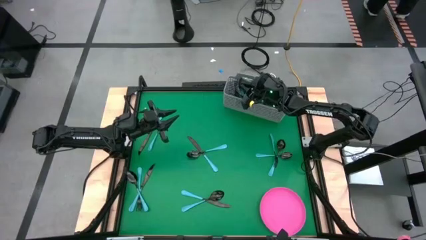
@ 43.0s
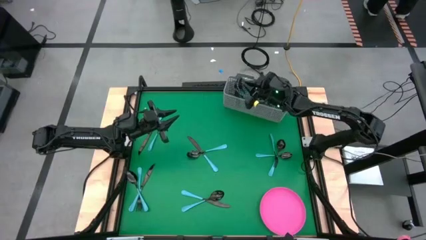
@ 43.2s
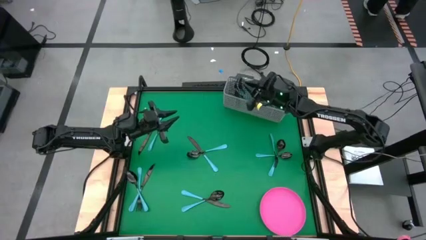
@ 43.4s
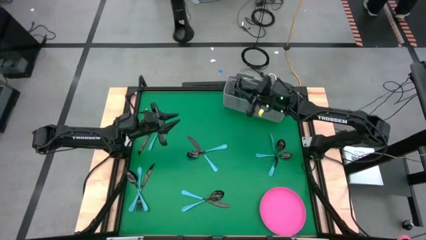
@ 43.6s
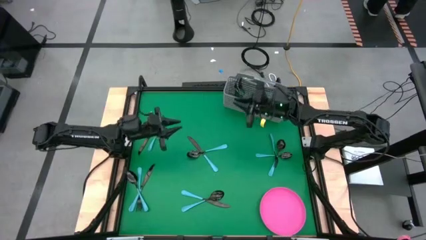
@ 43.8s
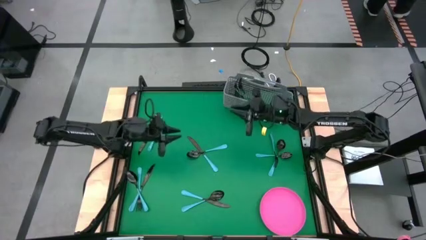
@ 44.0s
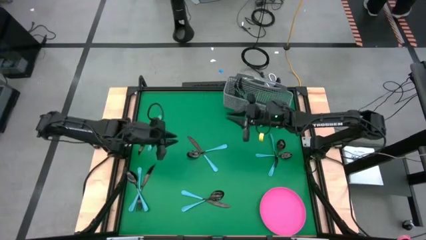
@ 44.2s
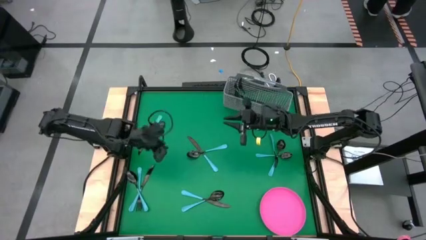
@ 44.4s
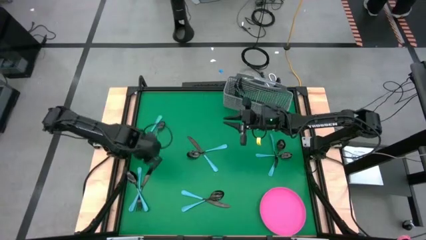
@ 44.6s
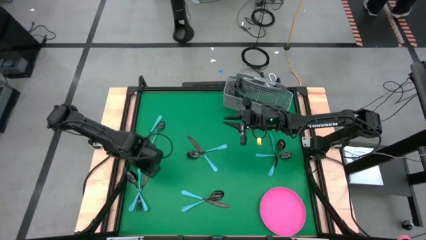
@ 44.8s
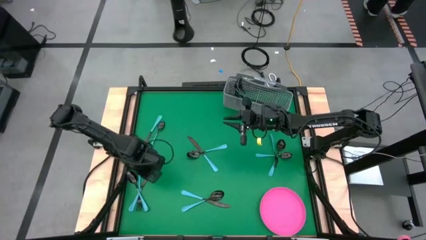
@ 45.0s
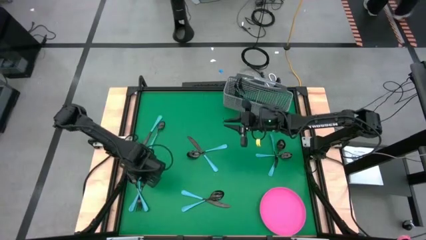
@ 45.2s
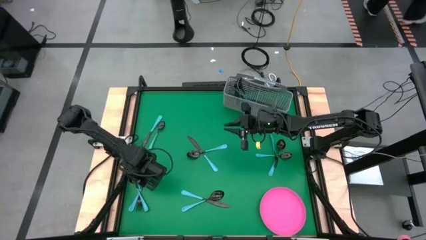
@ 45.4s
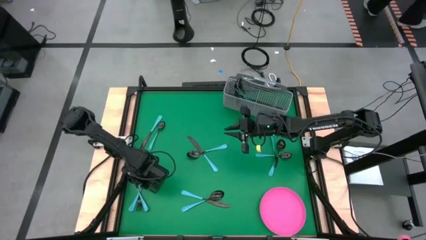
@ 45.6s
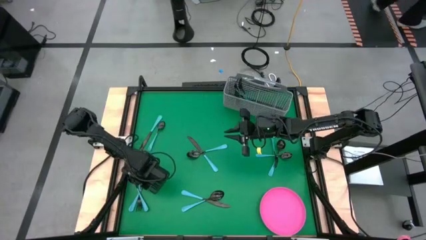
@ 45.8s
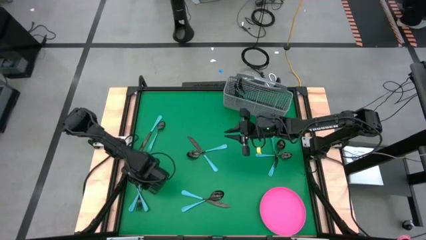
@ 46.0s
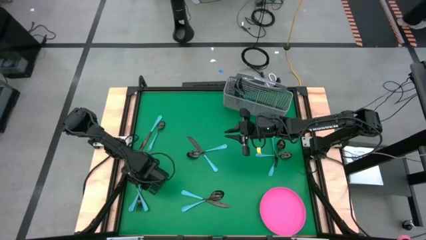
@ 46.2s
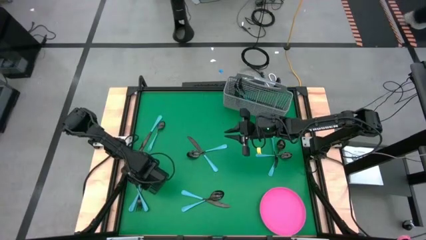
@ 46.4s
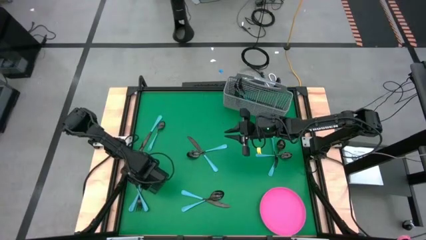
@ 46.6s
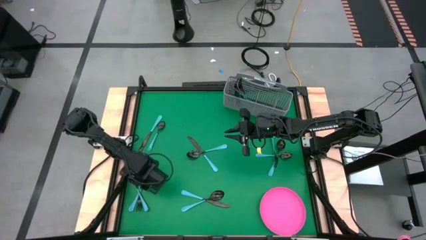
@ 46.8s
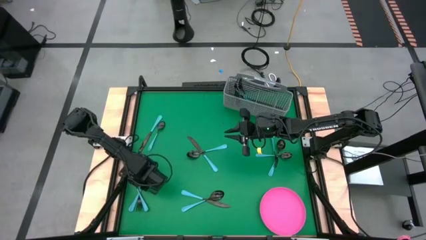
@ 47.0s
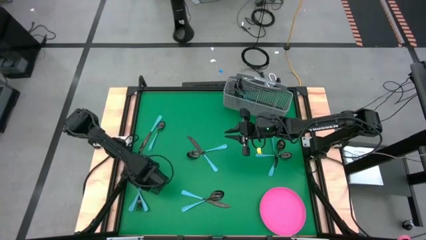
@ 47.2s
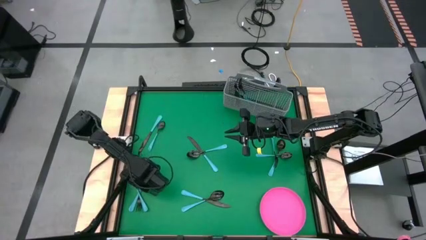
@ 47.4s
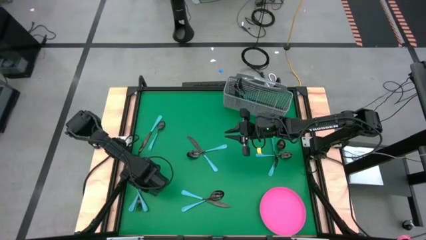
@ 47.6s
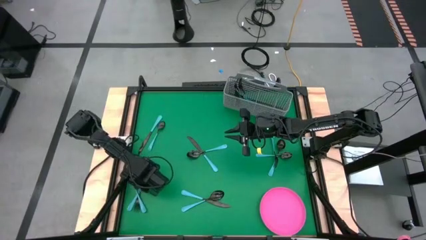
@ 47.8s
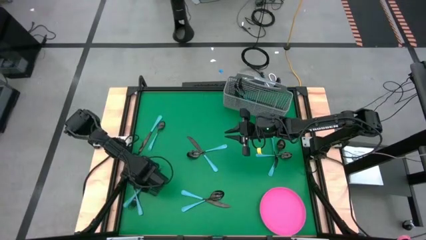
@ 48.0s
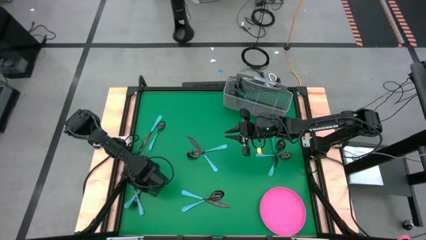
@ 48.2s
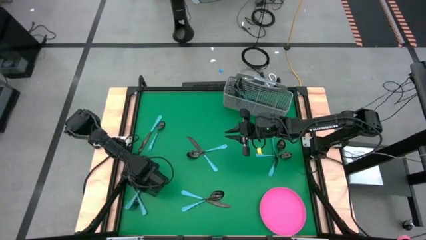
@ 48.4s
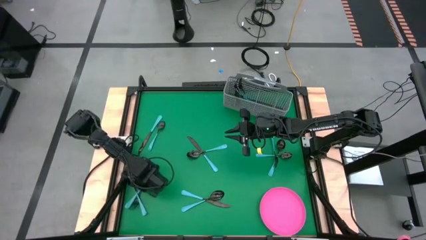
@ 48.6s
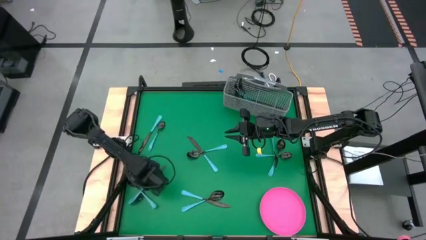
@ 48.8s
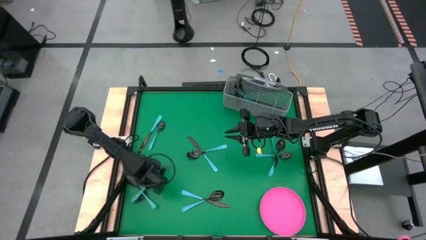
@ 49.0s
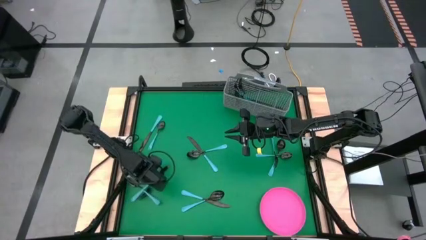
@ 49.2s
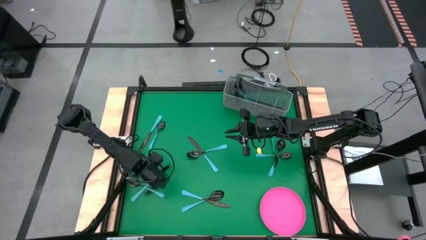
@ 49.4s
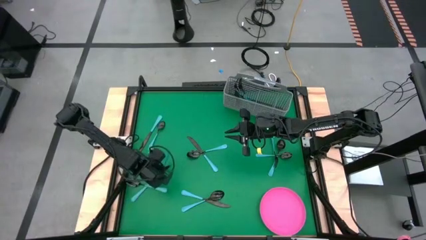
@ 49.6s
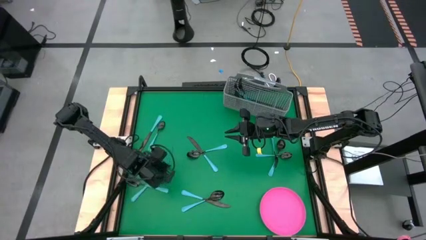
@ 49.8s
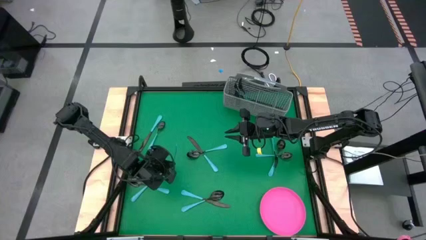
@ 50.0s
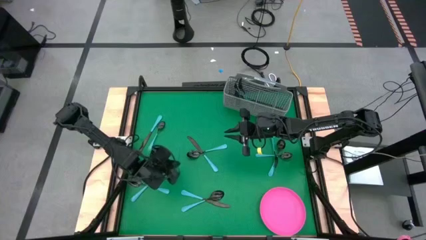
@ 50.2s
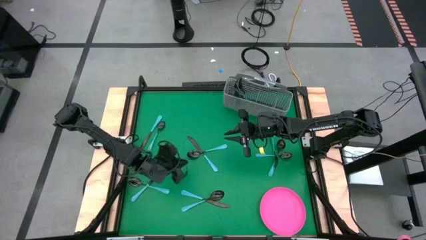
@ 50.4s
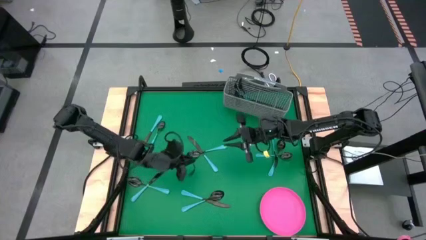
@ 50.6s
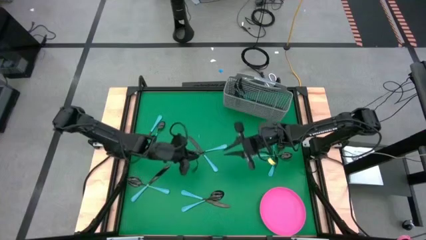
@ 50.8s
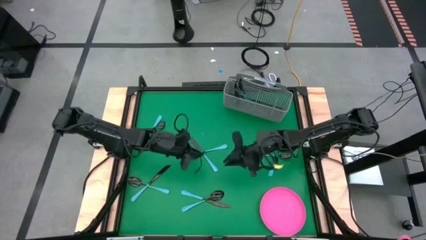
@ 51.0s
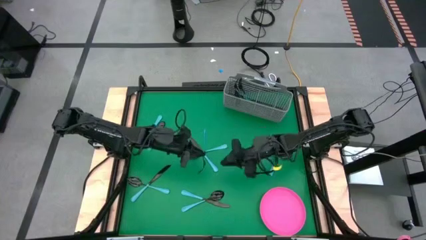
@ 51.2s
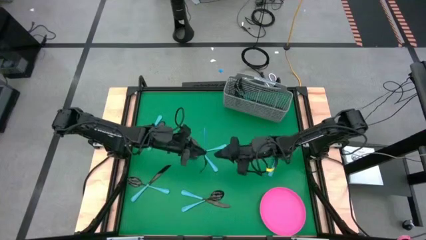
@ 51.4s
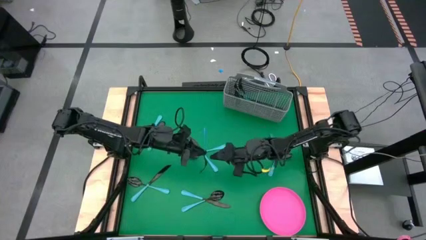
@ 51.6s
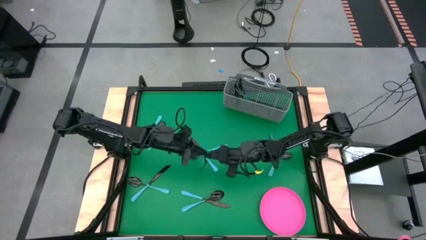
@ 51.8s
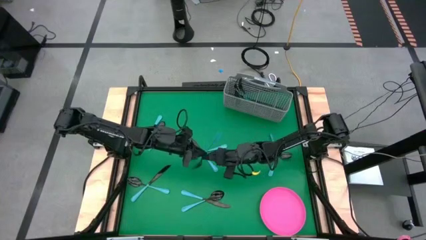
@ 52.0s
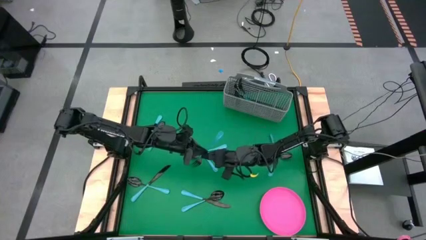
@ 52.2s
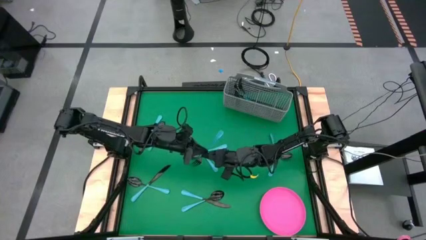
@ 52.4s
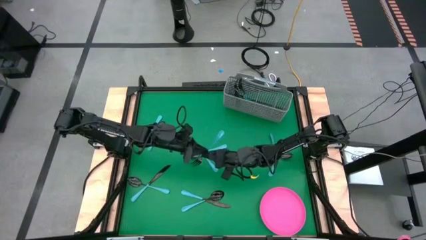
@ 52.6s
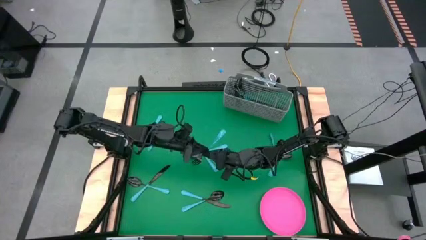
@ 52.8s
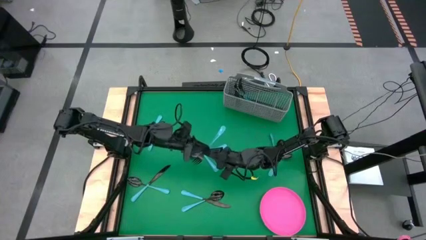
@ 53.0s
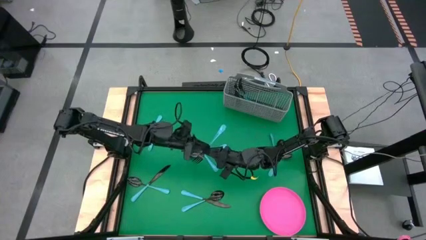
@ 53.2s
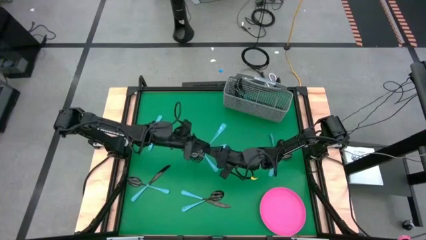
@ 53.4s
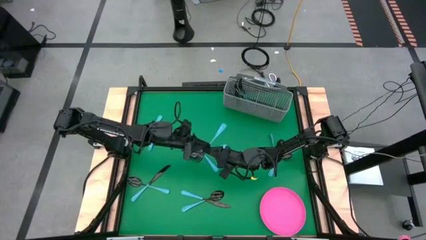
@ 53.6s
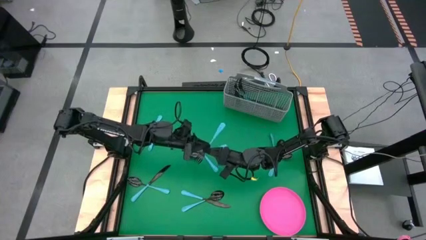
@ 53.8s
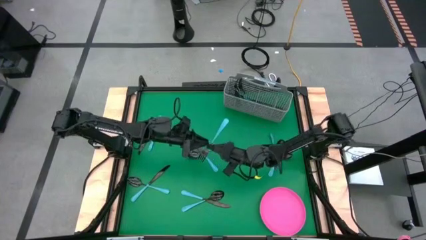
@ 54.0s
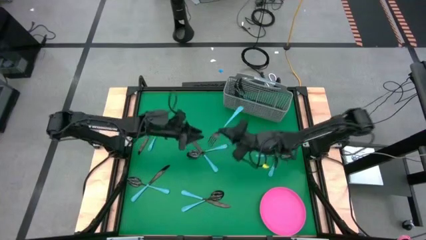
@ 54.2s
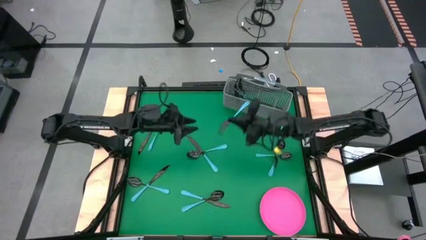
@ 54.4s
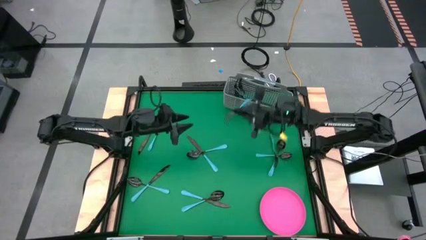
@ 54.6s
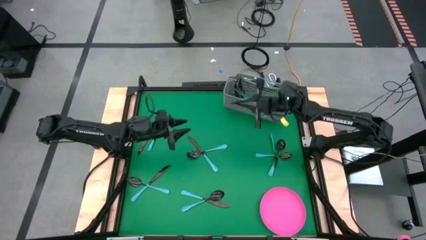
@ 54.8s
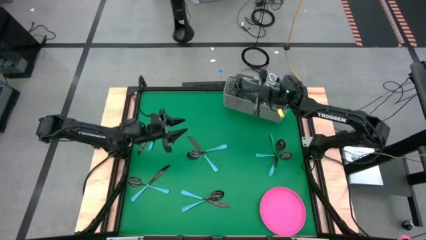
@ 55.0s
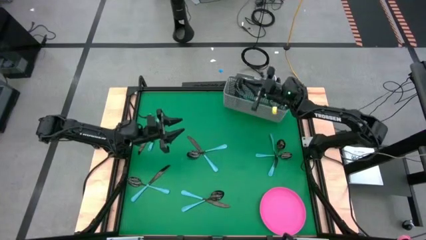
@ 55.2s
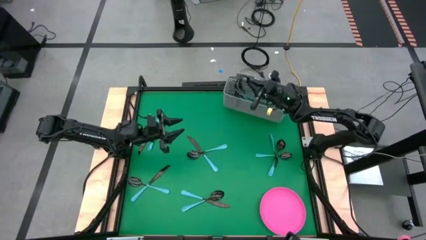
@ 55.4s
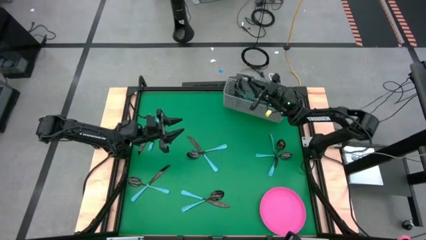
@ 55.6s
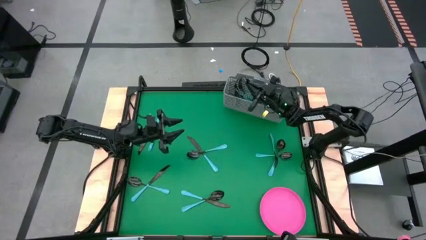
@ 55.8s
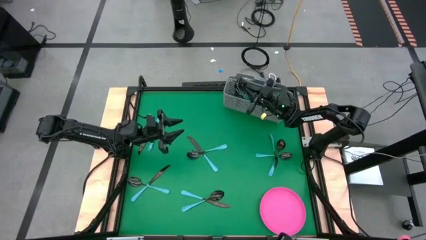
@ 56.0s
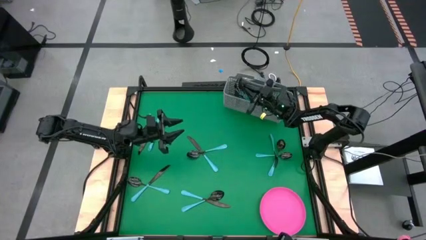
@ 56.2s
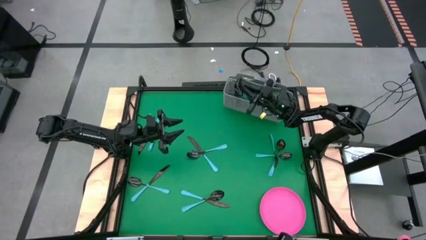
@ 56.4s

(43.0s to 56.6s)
Task: Sort silverware
Put the blue fork into the silverware basket

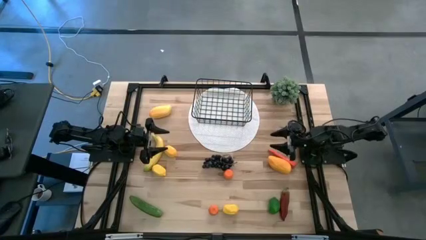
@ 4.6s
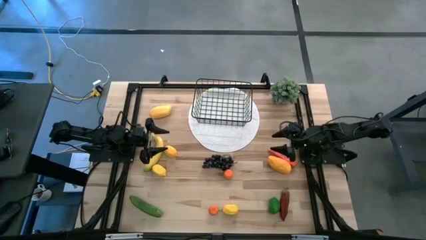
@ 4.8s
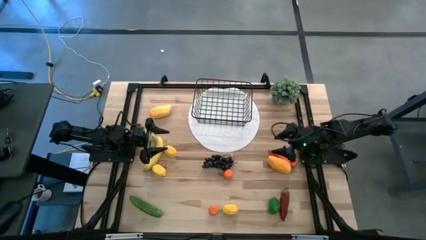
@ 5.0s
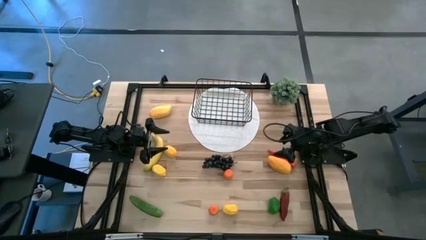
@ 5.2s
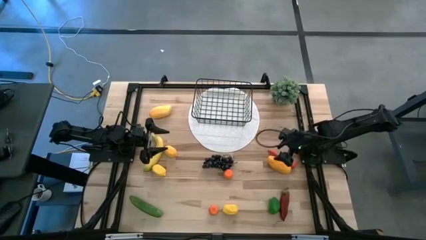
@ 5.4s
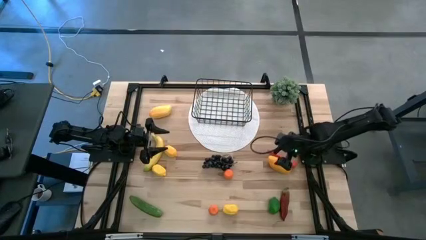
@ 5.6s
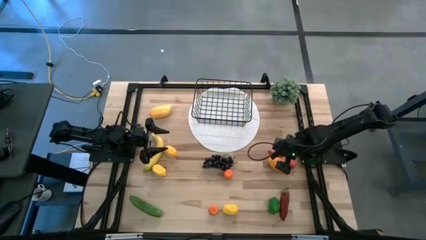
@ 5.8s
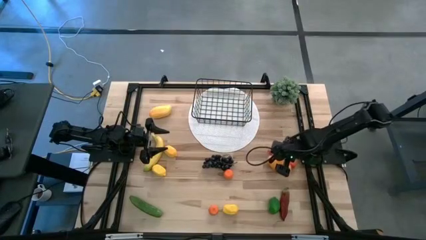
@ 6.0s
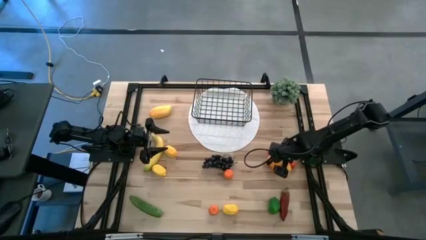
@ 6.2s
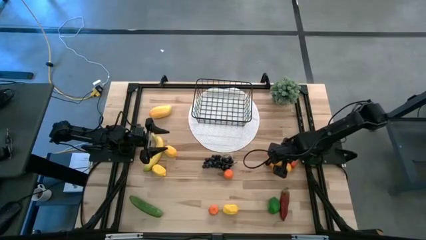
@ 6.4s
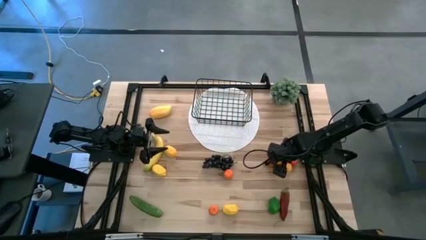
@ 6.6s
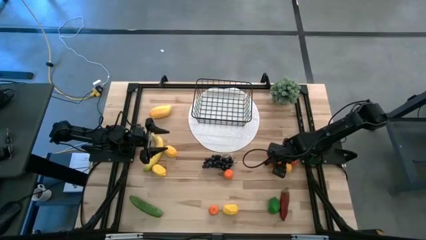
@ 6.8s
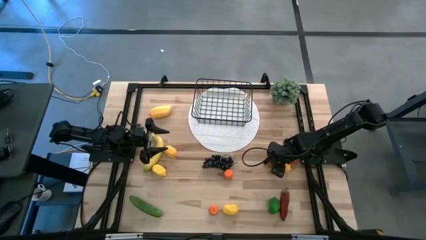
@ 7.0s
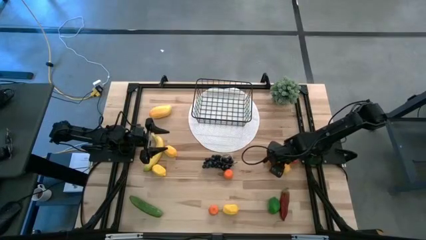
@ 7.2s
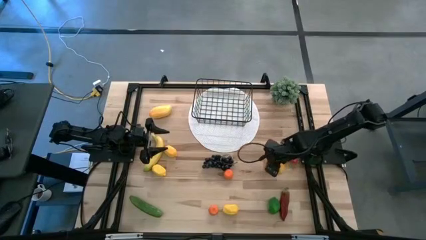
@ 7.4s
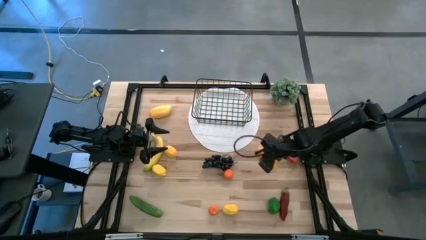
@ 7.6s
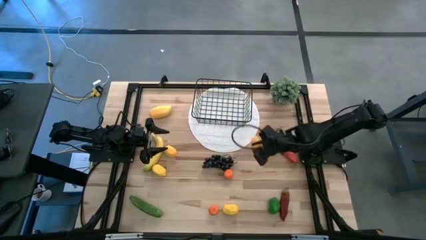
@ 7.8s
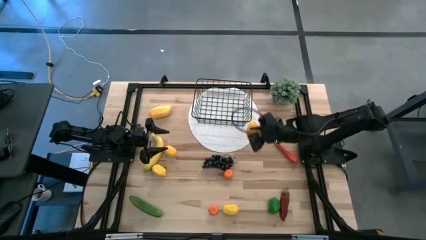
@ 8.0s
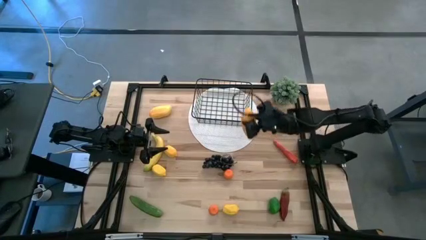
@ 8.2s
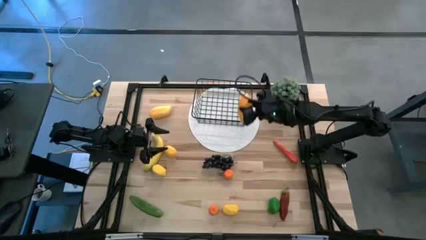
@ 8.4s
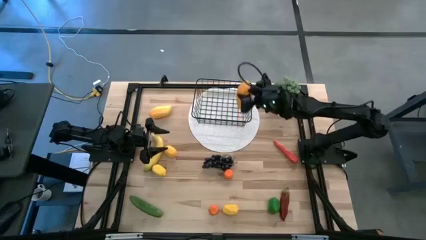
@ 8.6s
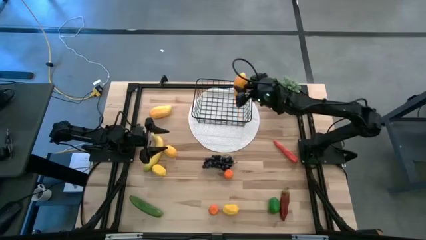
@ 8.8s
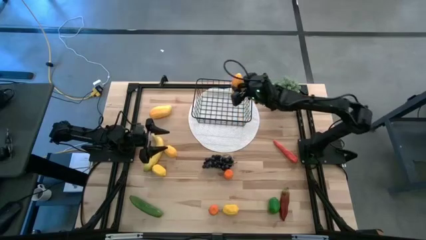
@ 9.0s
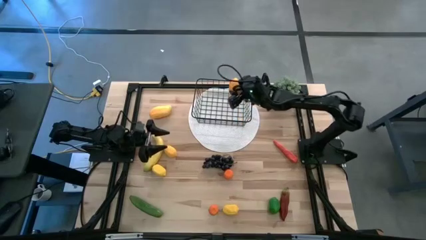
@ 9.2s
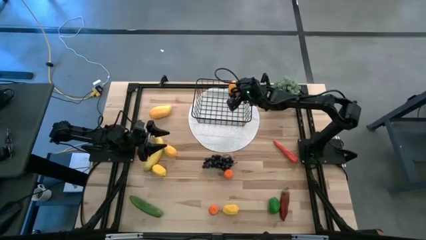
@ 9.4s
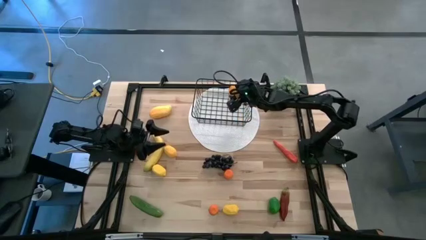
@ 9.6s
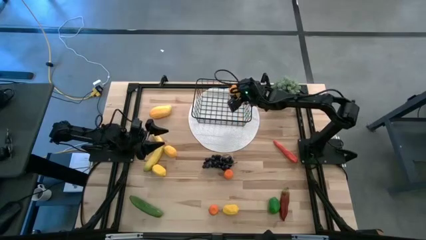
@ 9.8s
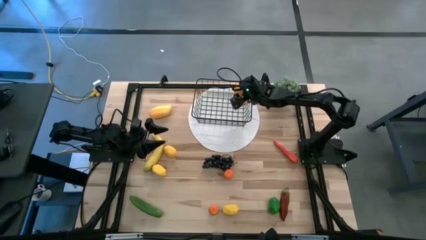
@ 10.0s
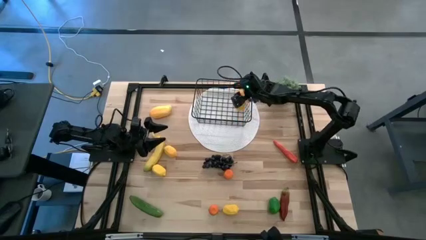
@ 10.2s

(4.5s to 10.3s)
Task: Build produce basket
Put the right mango into the mesh basket
